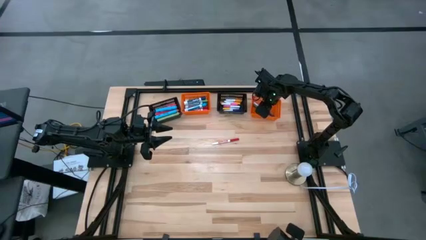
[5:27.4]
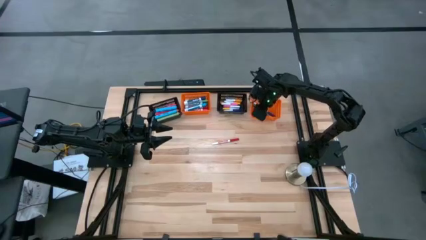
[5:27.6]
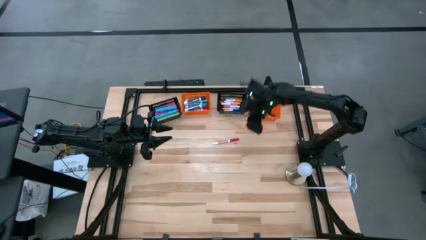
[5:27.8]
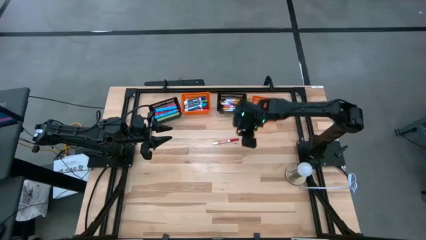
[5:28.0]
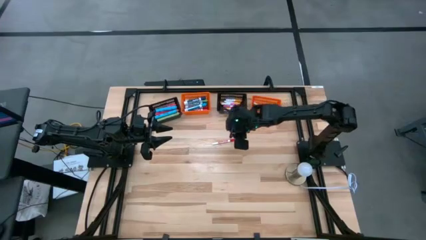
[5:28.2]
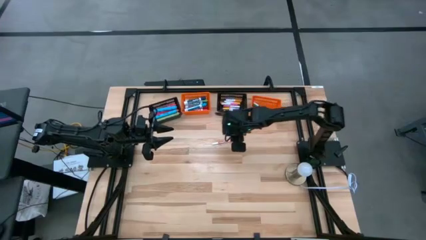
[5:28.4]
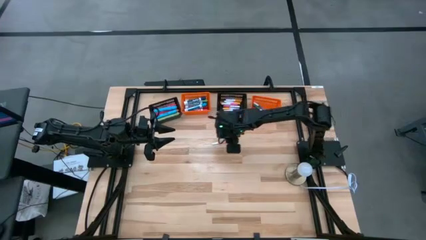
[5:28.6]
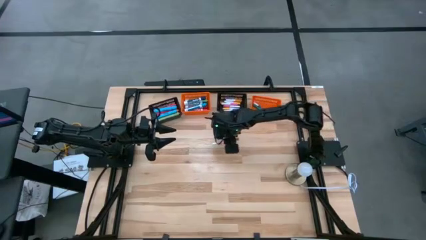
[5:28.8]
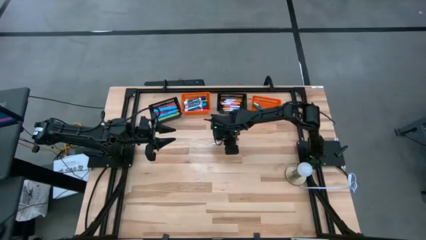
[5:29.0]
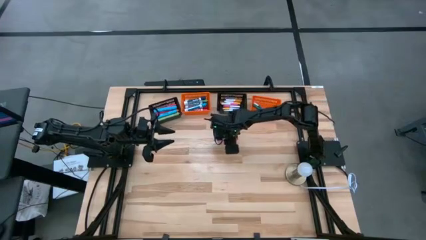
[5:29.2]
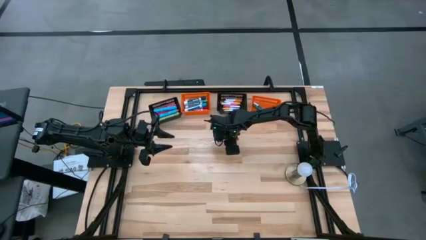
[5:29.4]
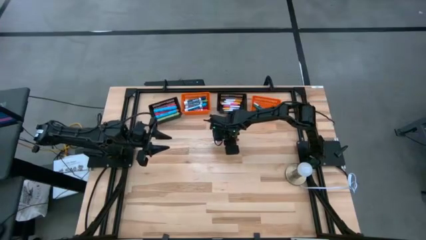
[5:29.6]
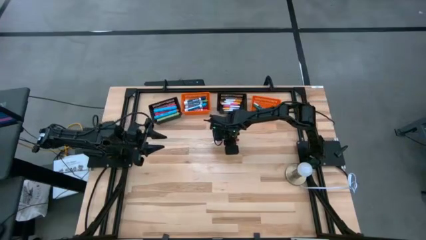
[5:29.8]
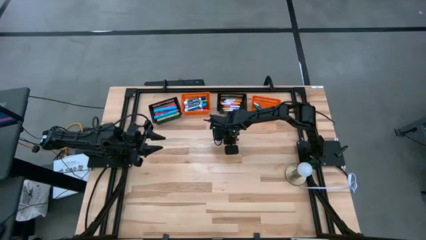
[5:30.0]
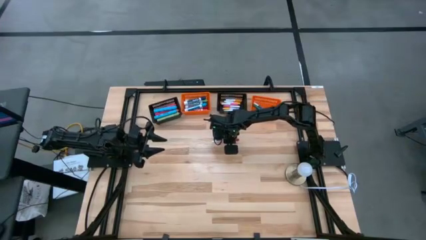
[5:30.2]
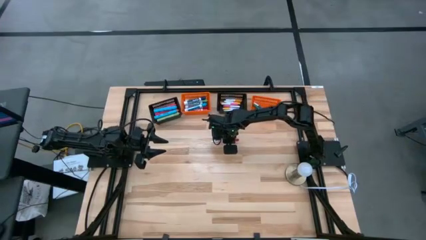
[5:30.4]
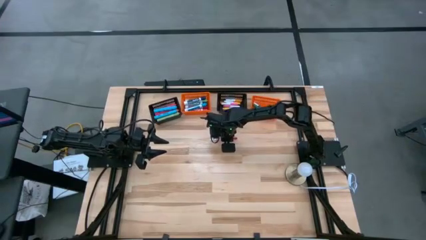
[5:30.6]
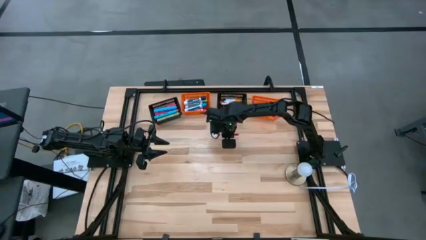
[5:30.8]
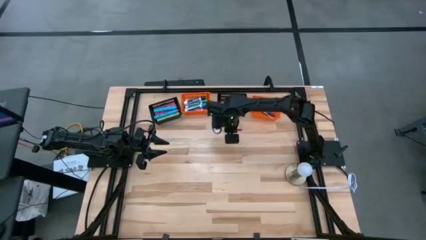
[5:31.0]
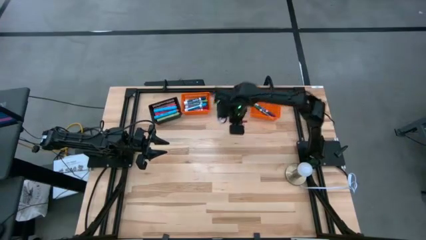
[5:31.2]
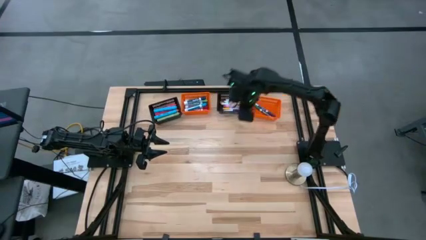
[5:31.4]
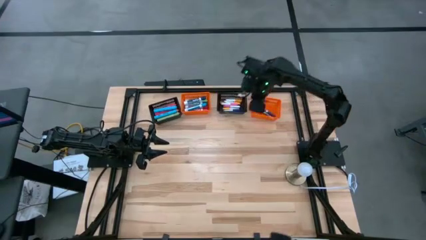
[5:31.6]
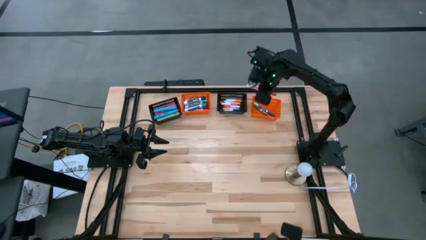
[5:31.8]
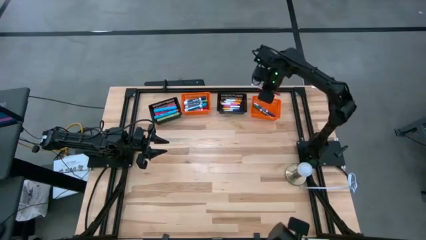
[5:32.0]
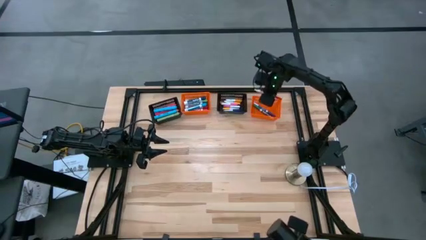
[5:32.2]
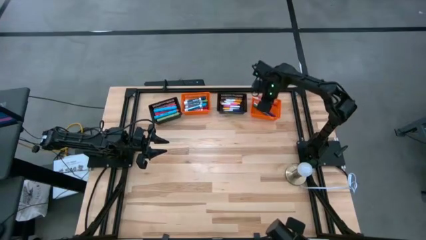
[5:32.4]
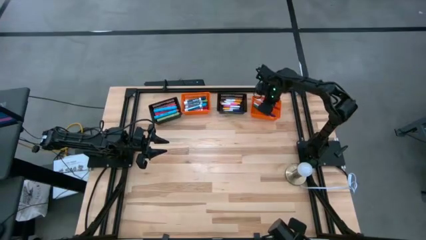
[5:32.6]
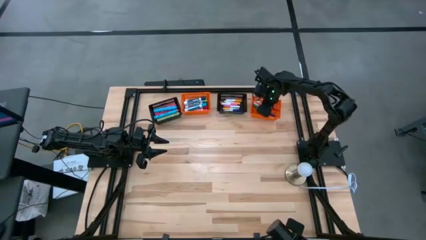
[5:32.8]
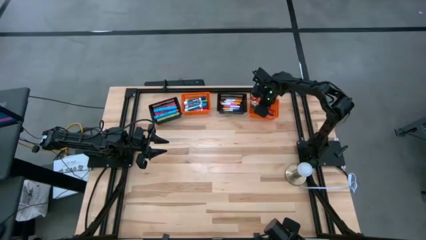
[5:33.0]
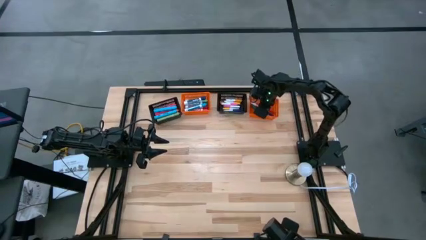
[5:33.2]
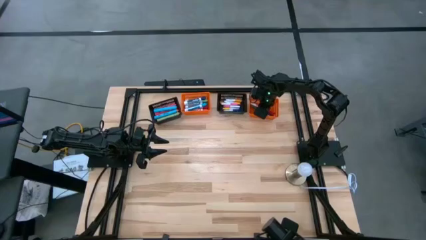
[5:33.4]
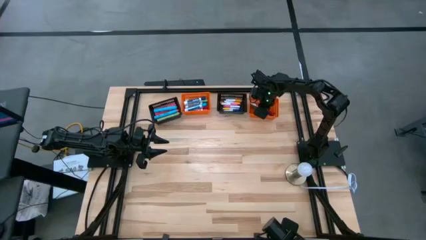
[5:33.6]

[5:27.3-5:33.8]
Task: Pick & Place Markers
Put the thin red marker pen into the right orange bin

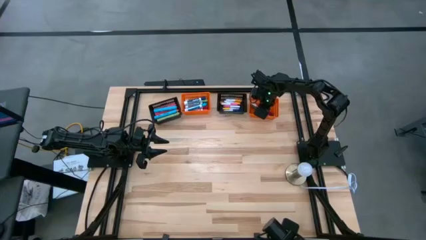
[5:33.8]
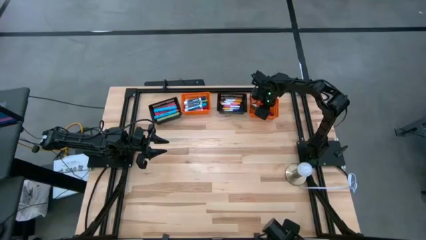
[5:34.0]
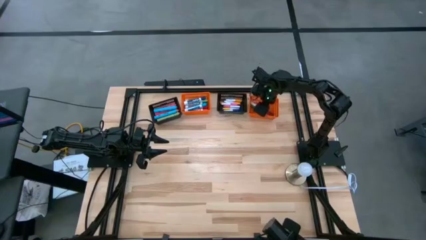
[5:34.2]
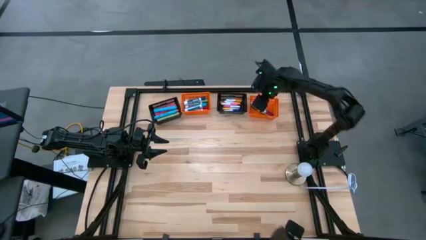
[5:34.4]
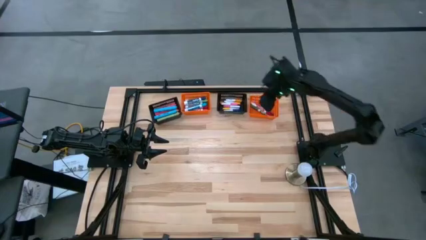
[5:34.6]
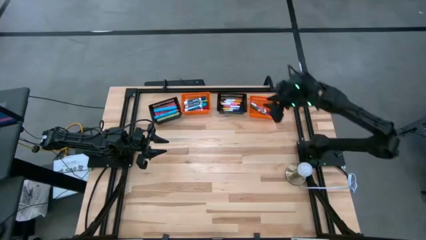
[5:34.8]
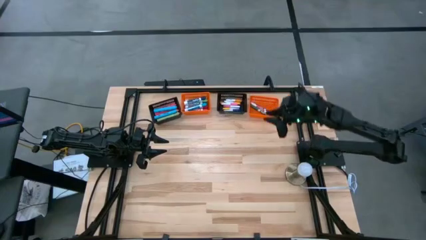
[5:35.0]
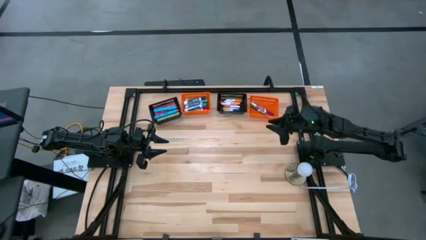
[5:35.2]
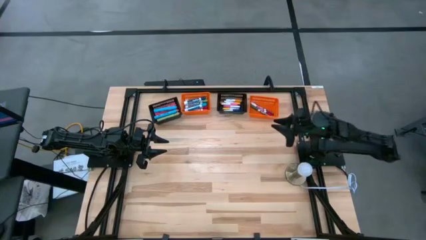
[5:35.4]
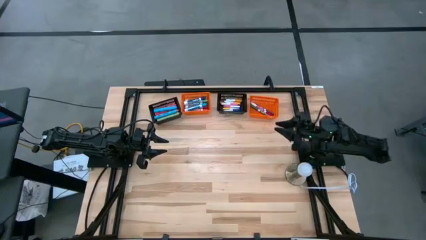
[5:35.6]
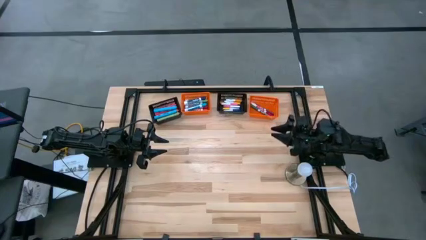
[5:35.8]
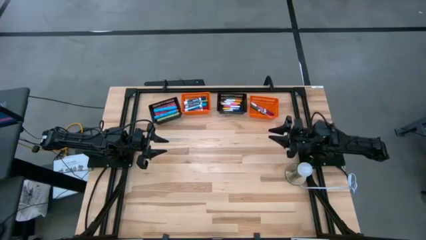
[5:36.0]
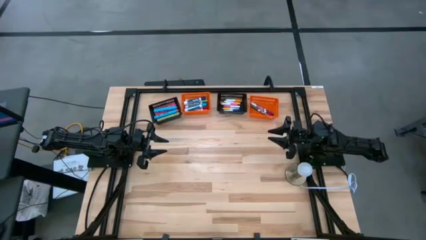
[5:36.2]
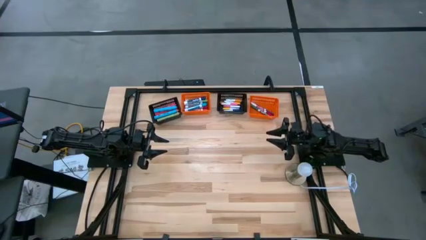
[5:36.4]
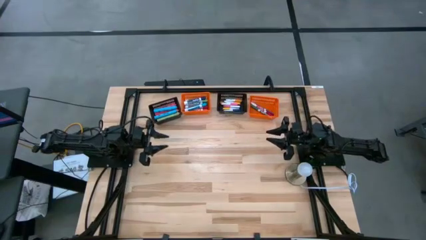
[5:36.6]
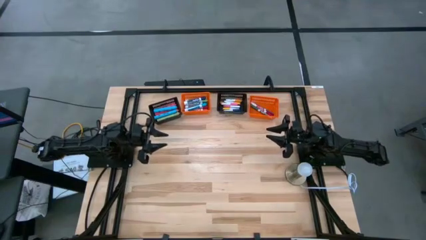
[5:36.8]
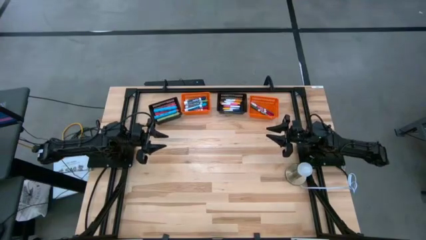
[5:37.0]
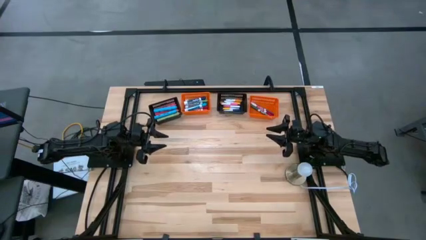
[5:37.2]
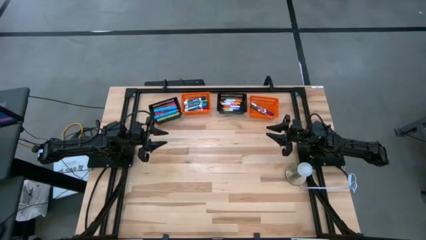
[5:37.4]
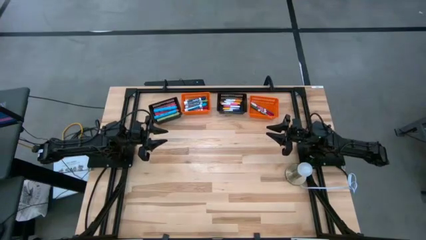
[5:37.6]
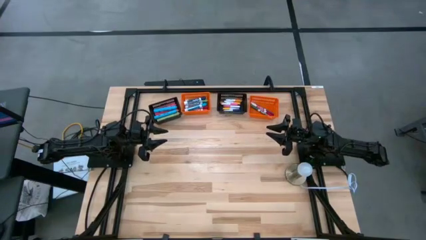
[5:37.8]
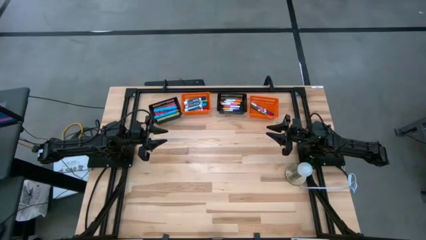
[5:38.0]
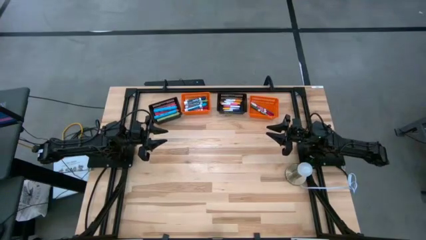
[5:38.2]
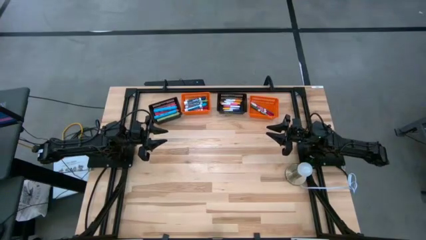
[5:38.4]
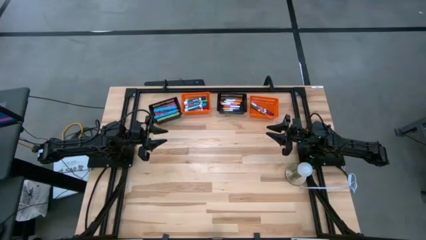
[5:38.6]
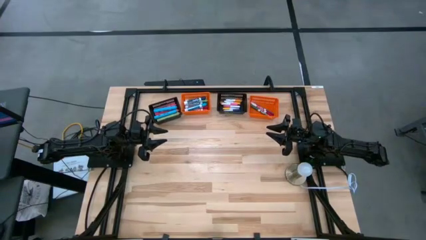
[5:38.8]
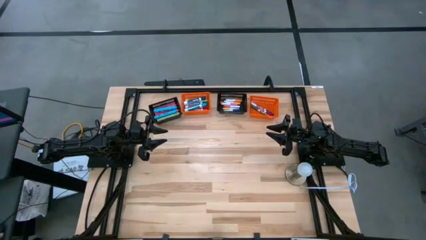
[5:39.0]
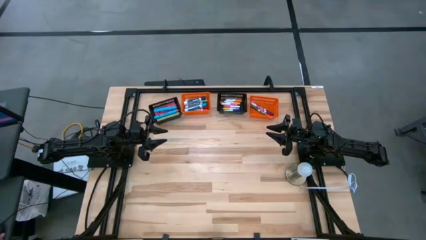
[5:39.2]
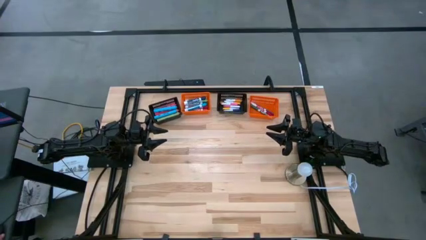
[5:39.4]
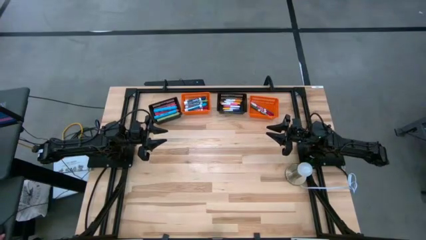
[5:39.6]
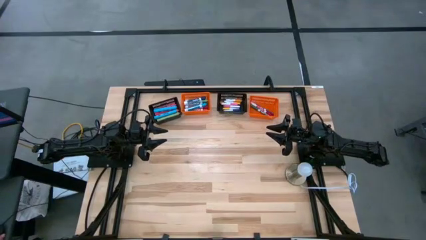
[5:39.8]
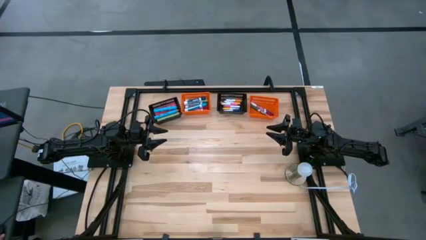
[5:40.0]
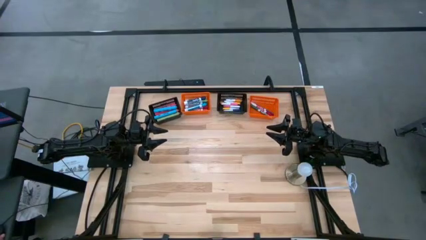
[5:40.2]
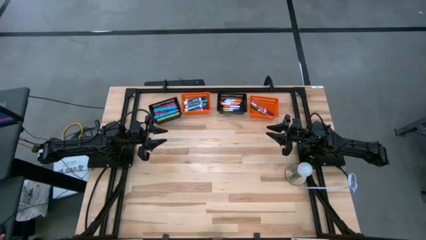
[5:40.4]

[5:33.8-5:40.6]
Return to home position

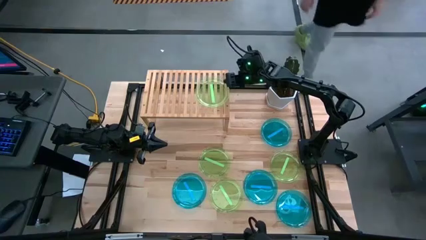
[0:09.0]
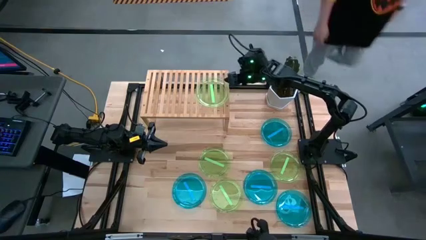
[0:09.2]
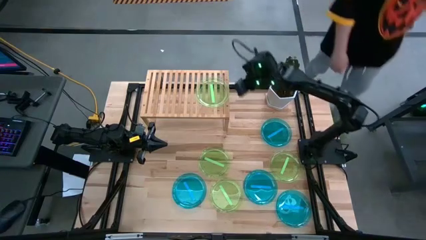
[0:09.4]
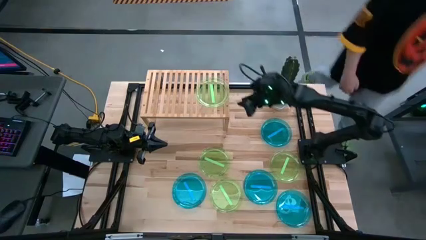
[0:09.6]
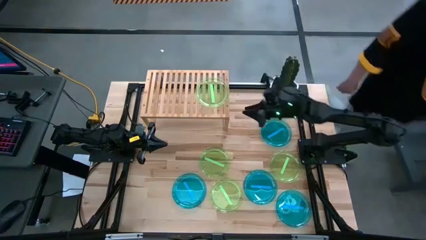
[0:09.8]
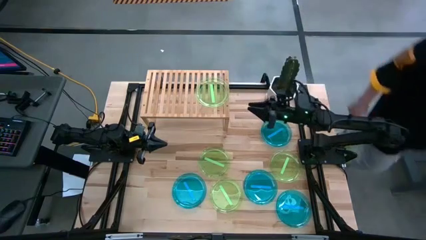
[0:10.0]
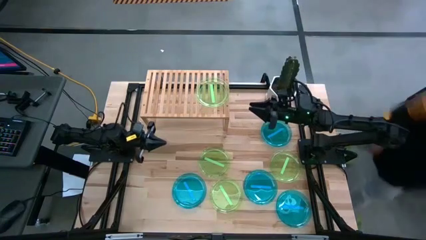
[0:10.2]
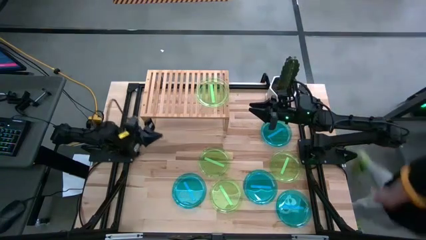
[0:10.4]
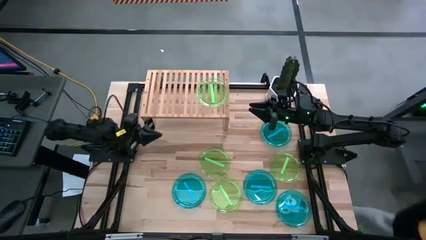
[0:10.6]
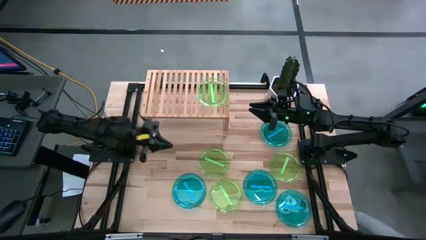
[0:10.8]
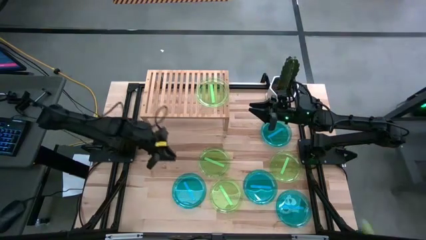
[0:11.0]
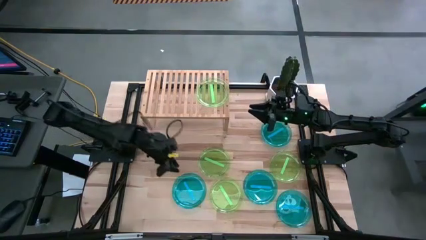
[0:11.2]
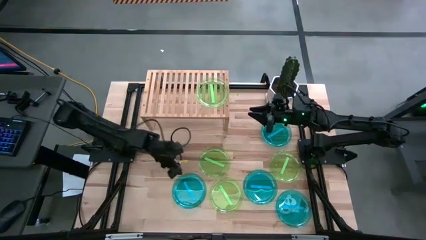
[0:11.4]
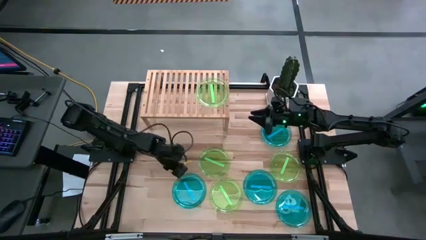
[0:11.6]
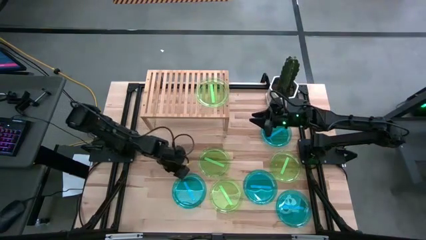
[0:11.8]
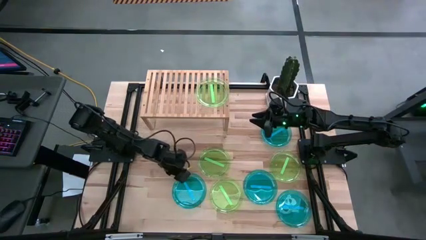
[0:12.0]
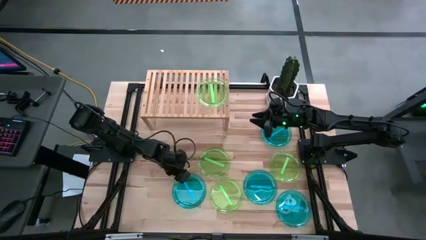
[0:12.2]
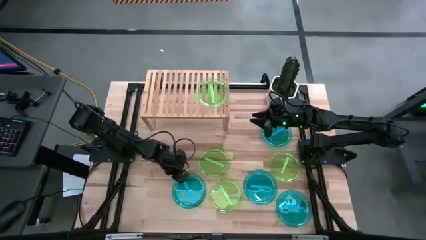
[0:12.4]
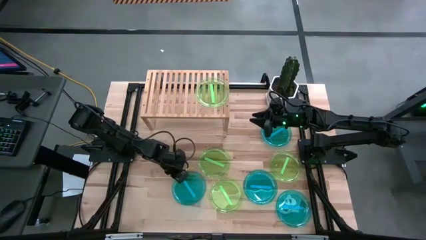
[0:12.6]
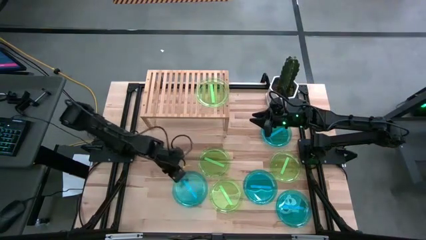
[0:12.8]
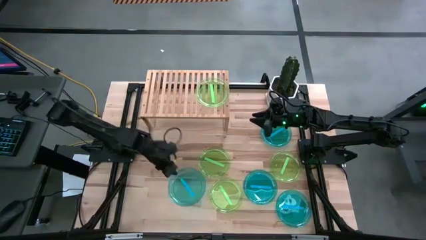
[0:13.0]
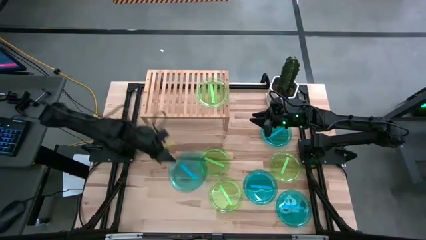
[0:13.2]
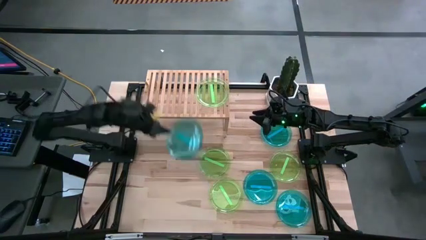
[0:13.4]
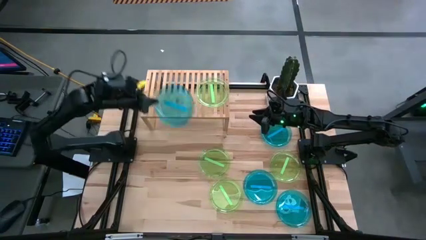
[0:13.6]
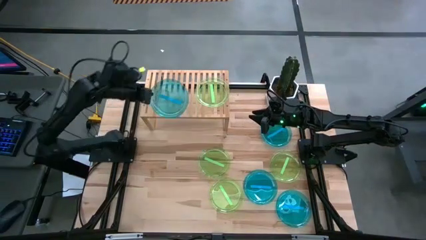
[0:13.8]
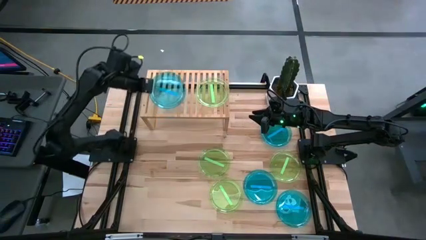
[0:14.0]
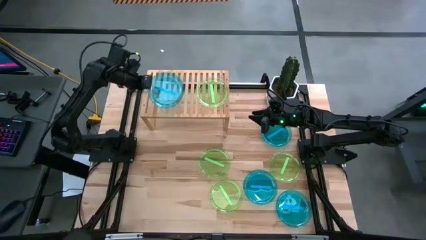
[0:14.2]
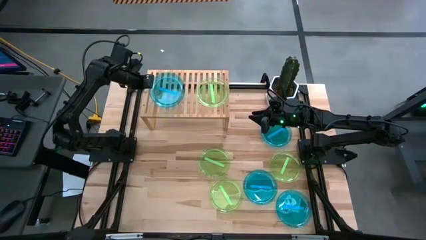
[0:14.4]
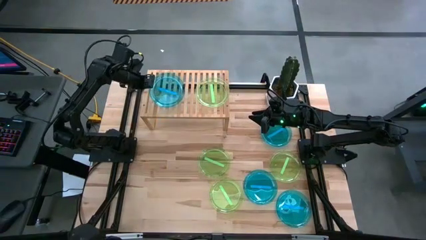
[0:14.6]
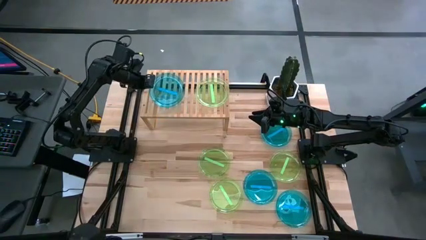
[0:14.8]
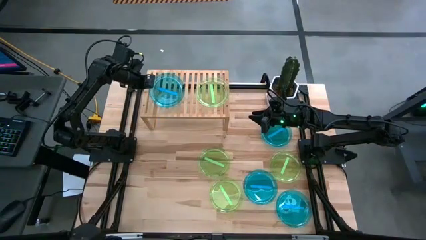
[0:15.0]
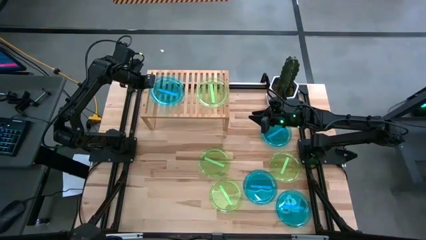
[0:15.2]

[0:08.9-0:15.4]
Task: Place and stack plates onto a shelf
Put the blue plate on the shelf
